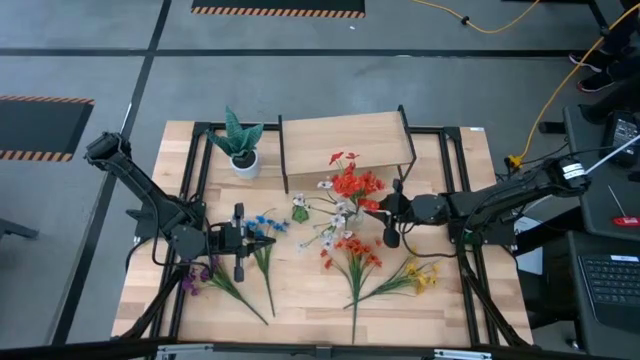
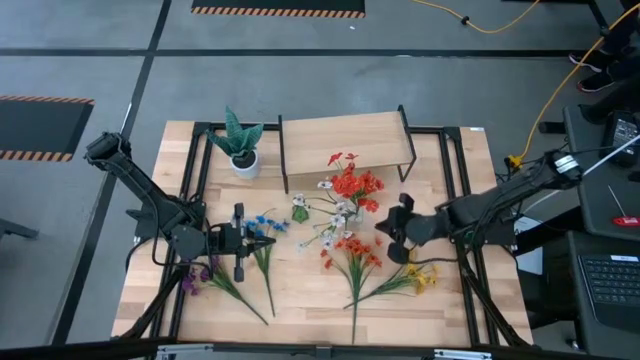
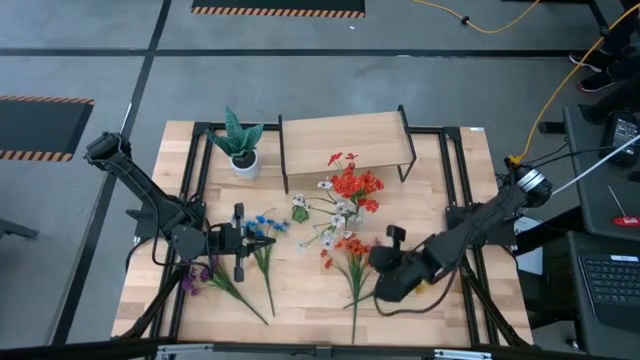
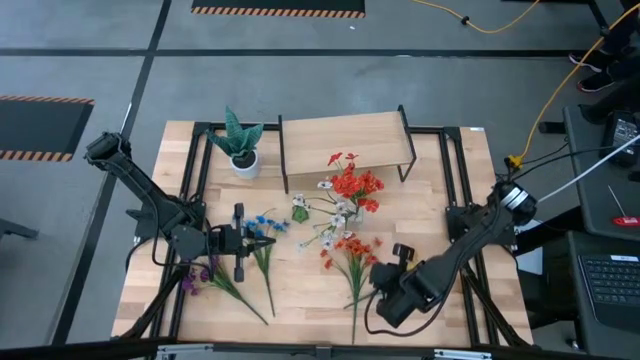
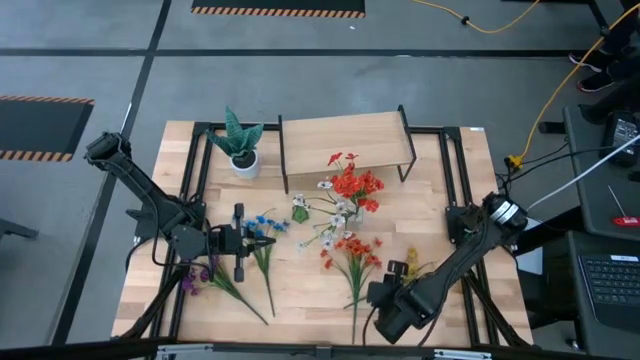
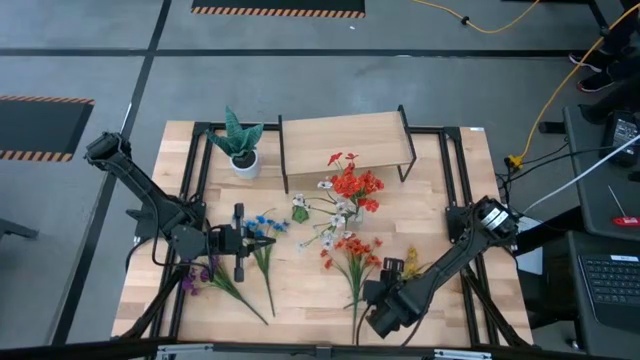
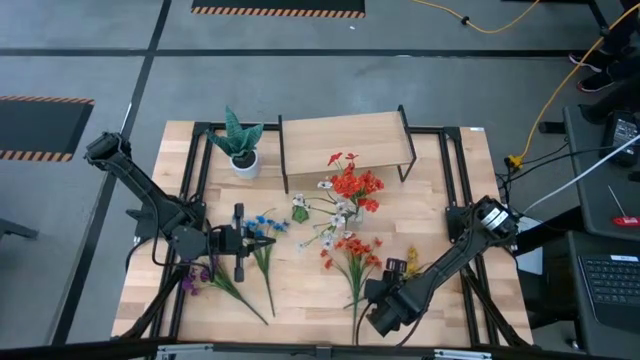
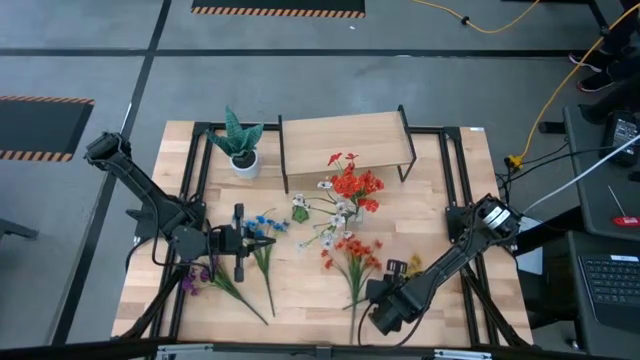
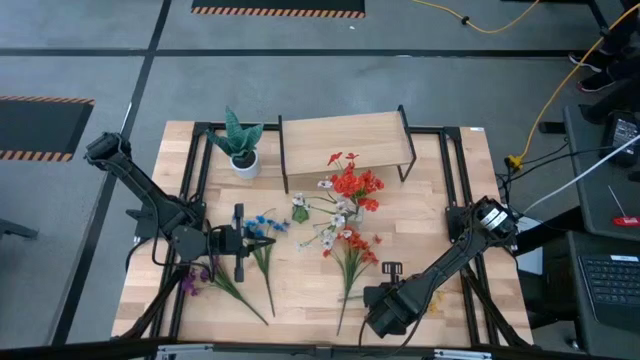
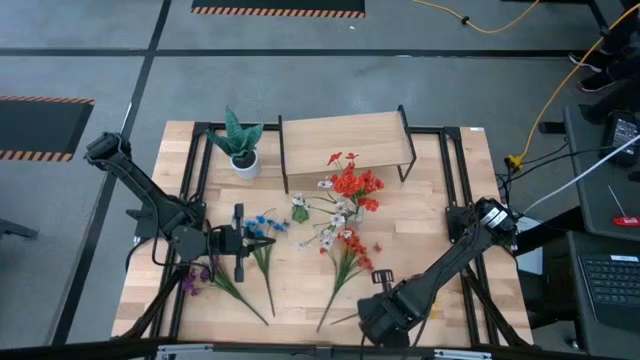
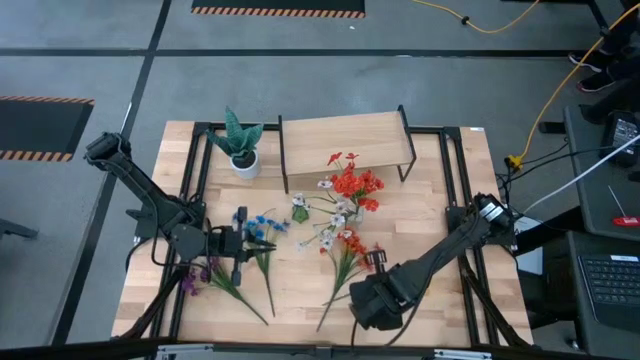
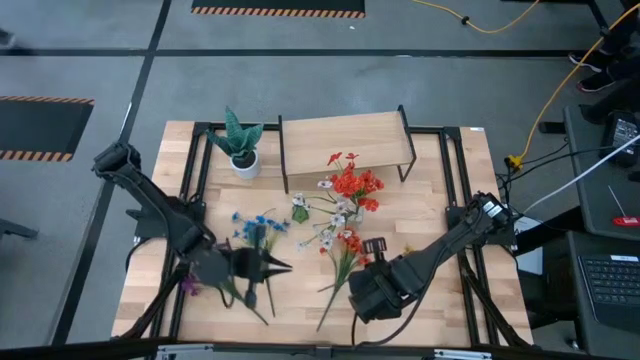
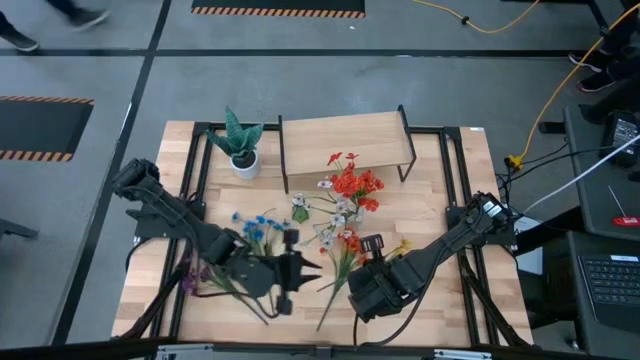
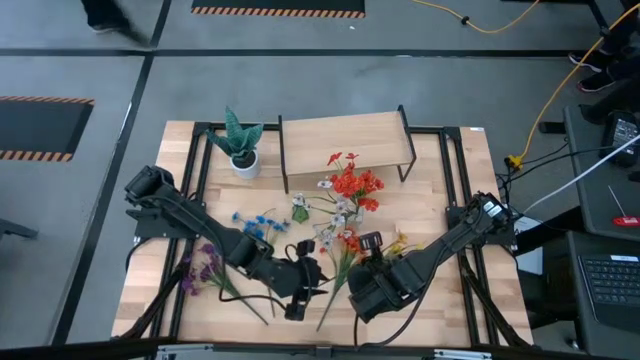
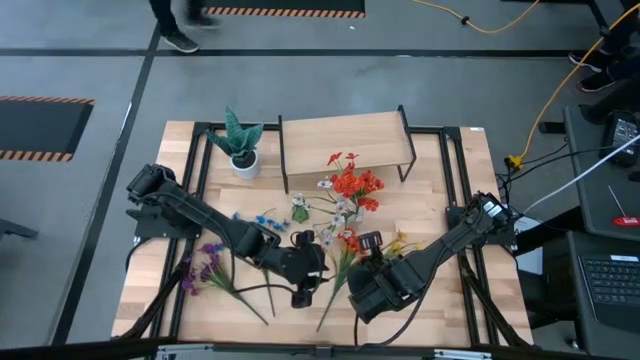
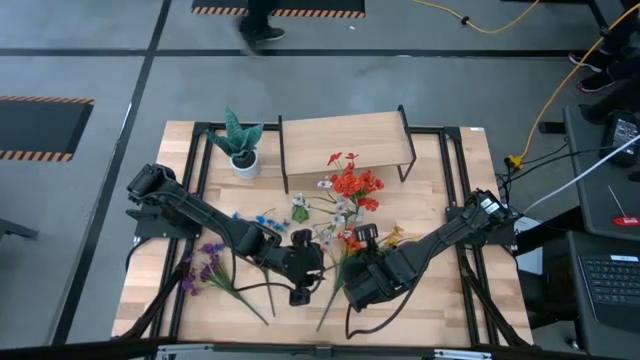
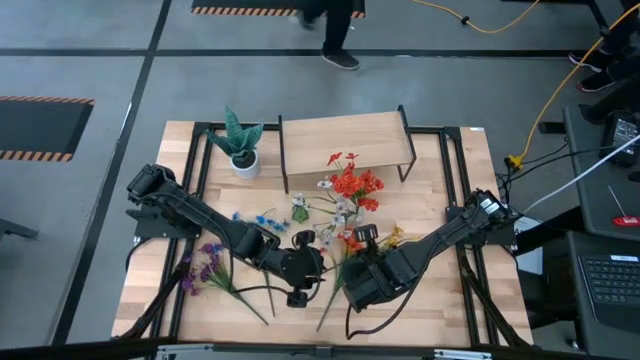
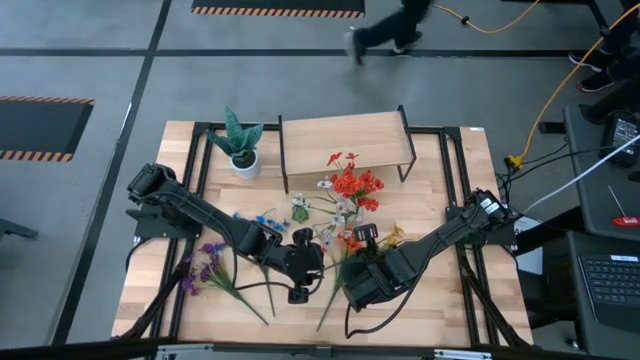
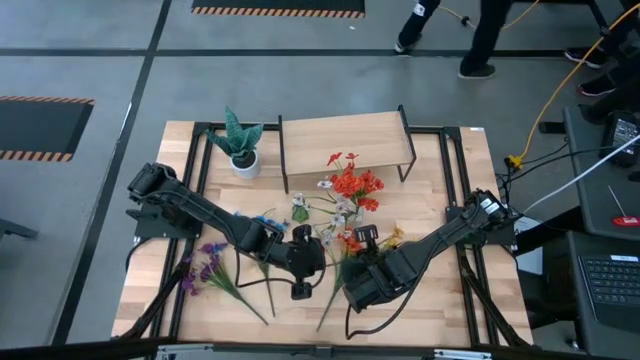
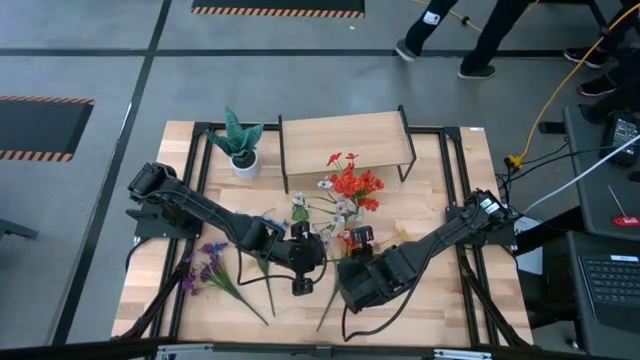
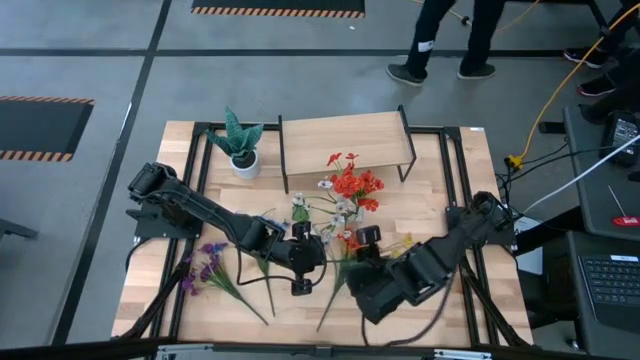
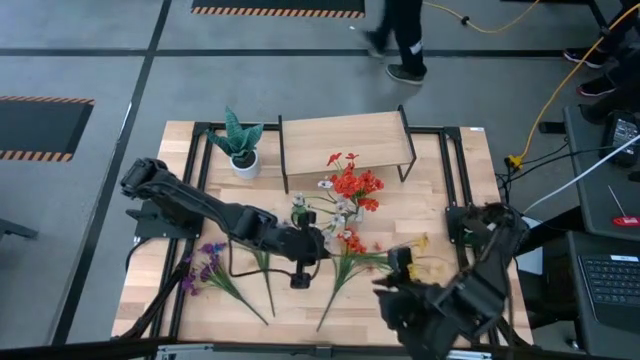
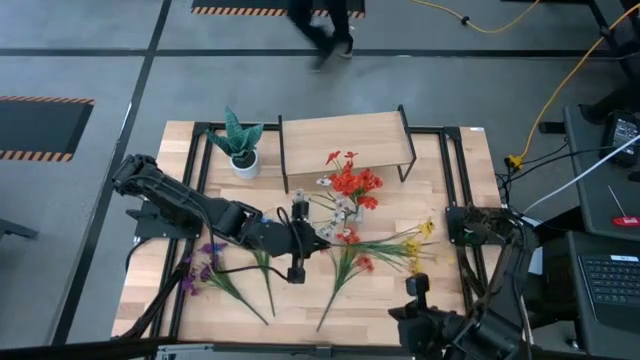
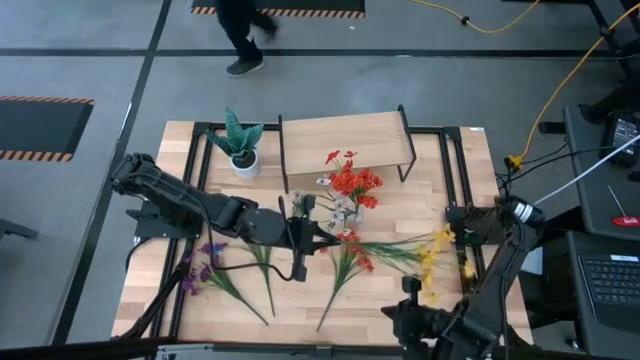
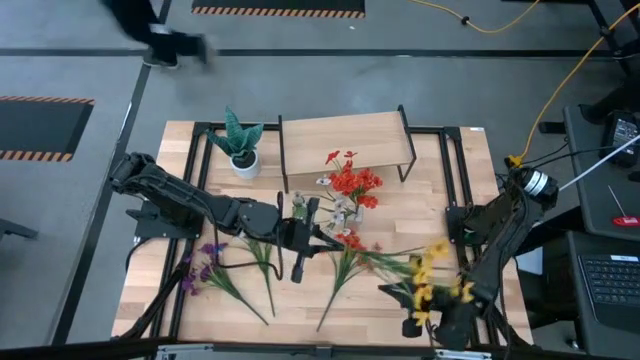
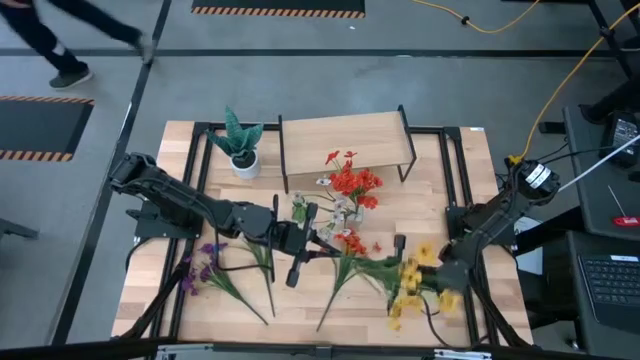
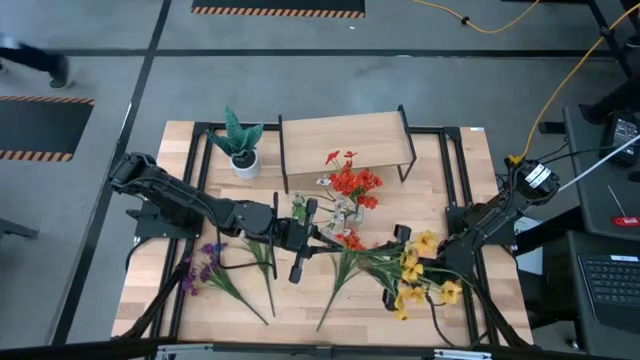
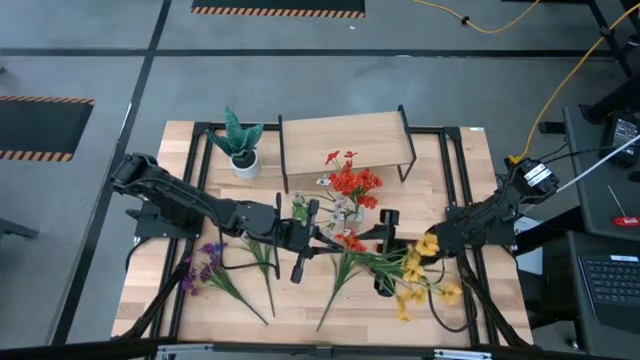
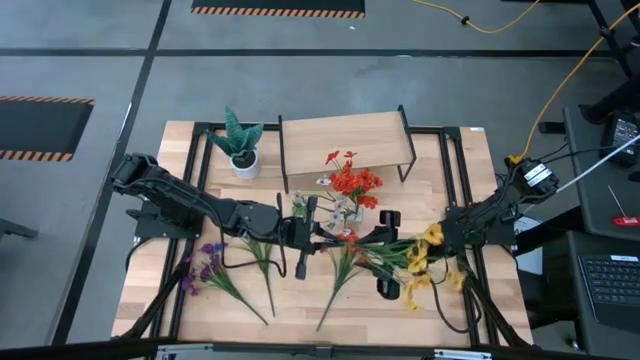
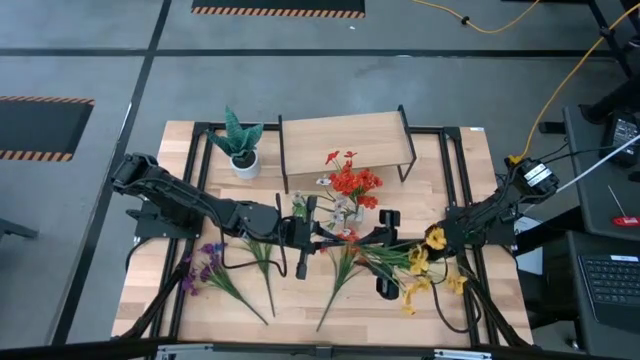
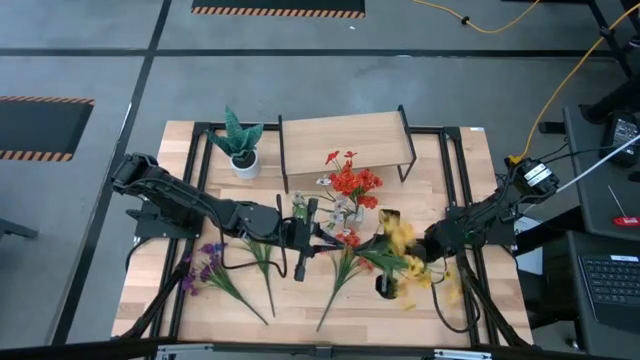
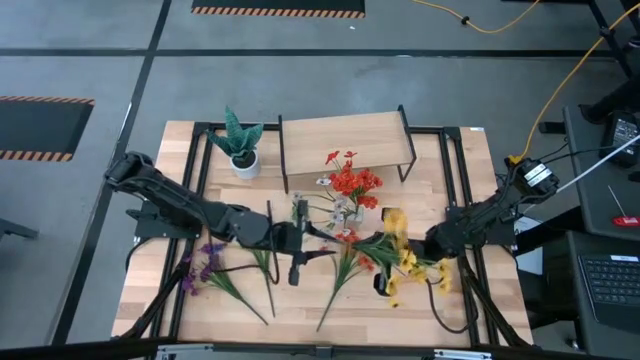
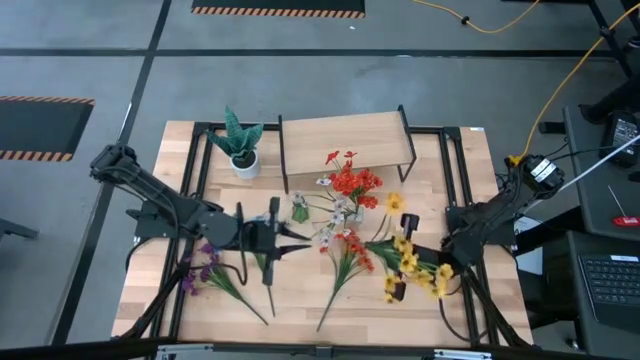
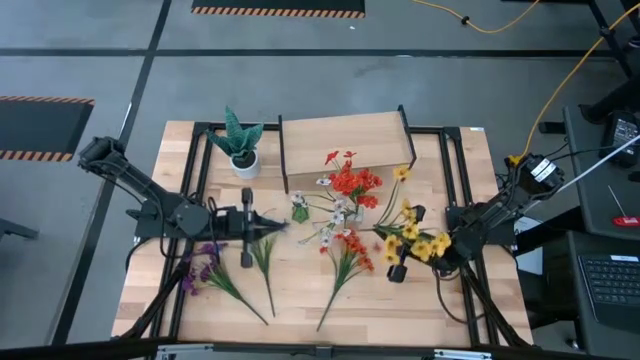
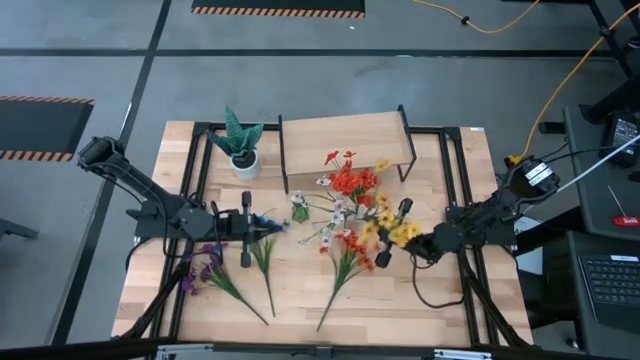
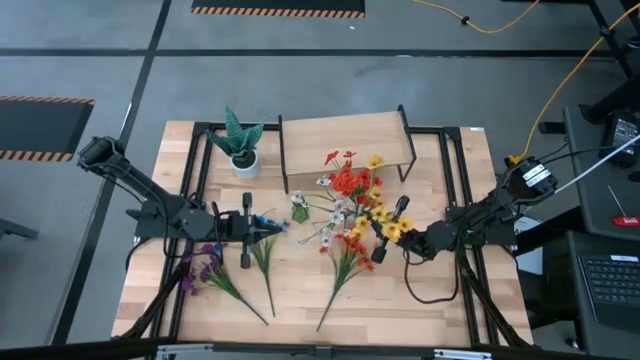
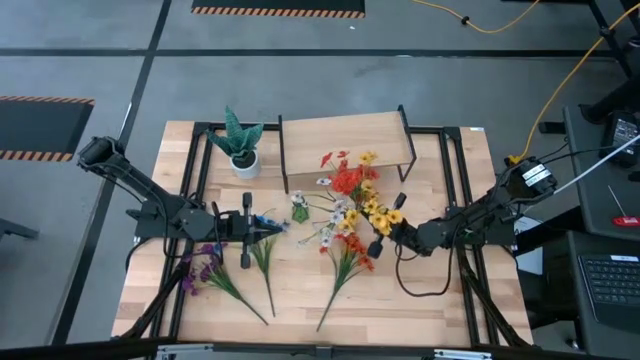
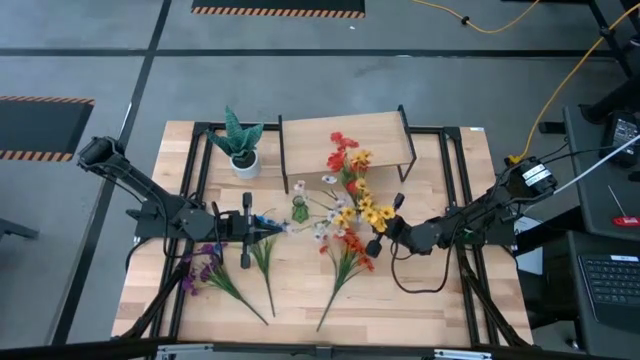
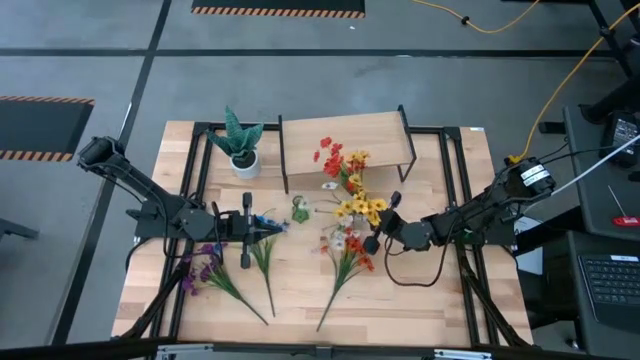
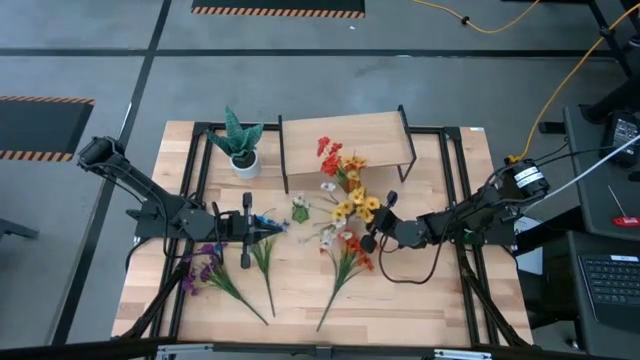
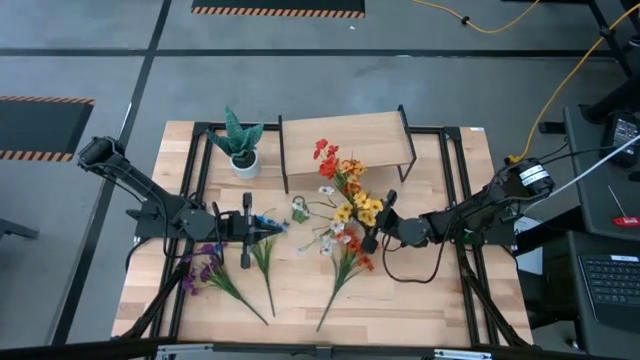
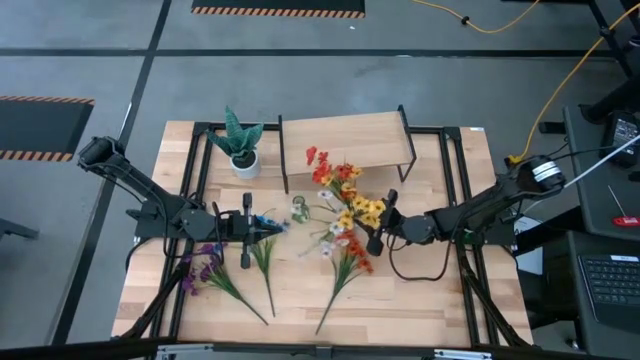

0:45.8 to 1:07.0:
Task: Pick and place flowers into a vace then onto a shelf
Put the yellow flowers into the transparent vase

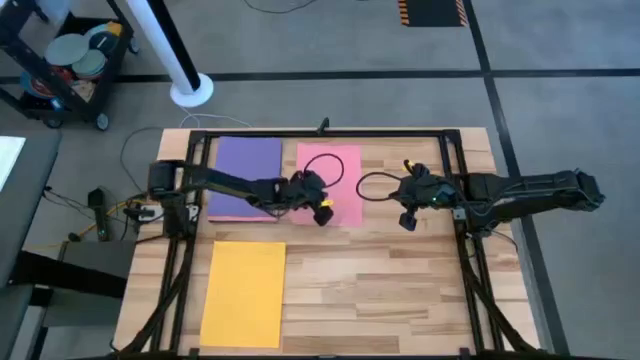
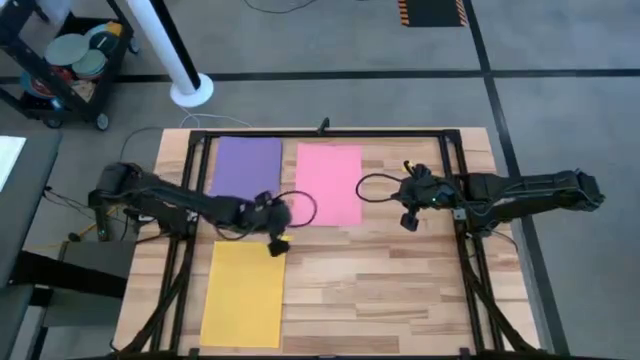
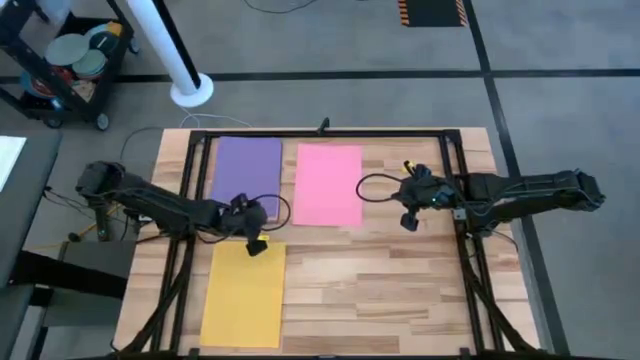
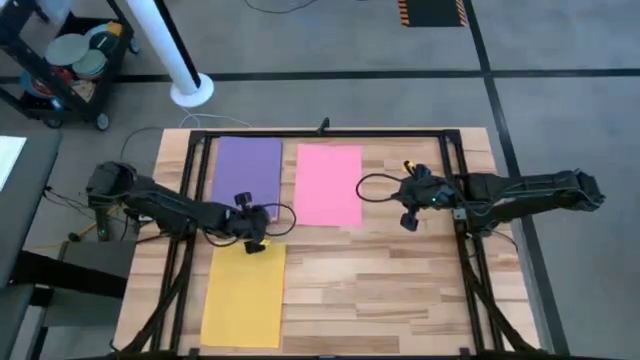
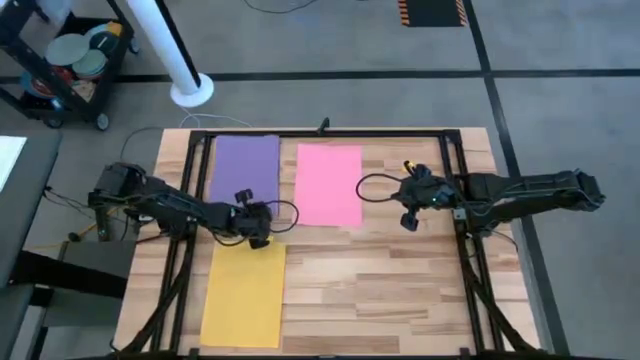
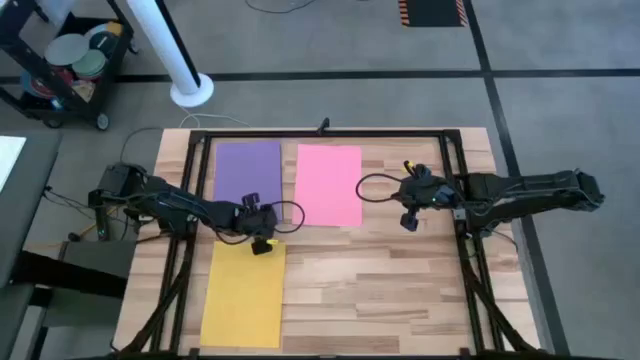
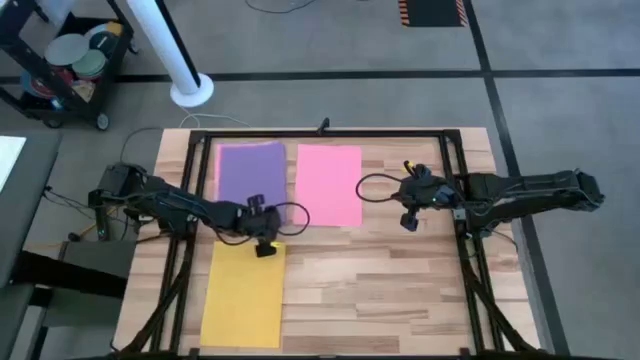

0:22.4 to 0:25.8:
Task: Organize paper
Put the purple paper to the top right on the table
